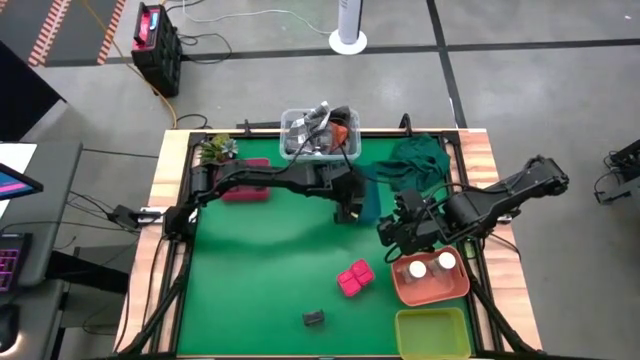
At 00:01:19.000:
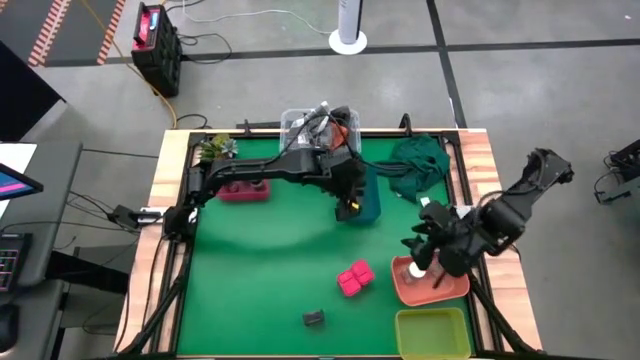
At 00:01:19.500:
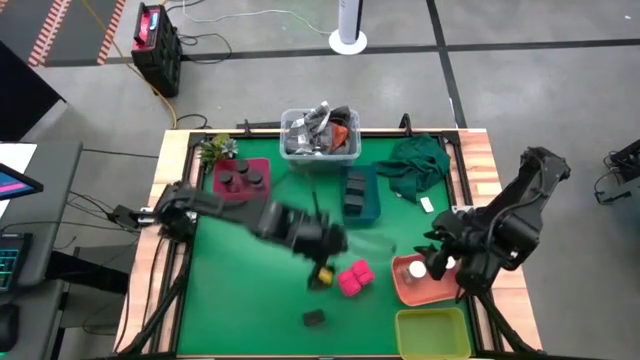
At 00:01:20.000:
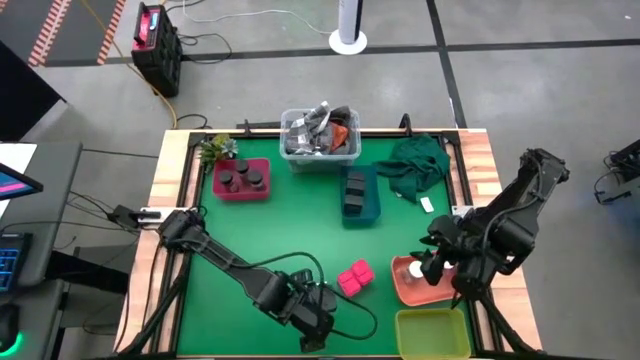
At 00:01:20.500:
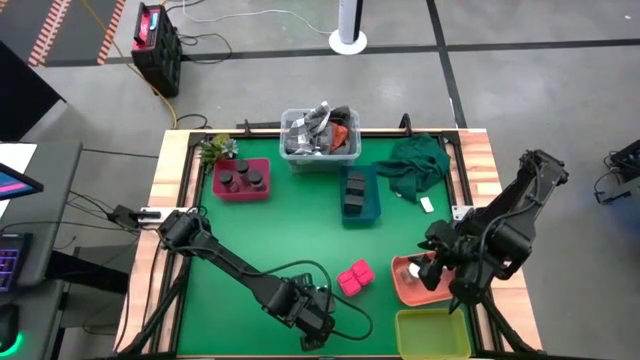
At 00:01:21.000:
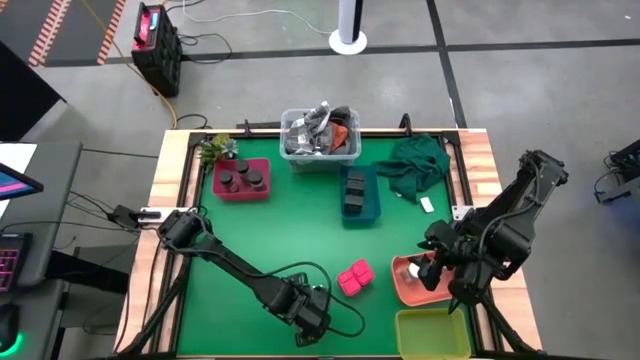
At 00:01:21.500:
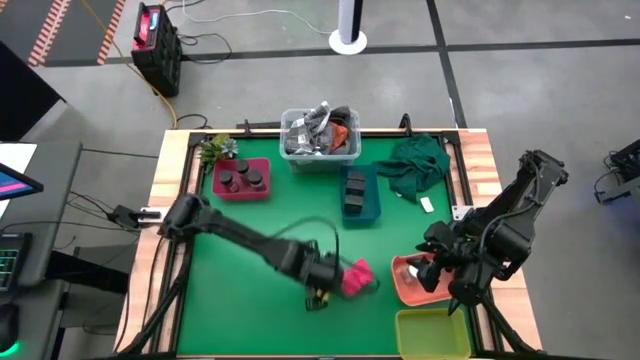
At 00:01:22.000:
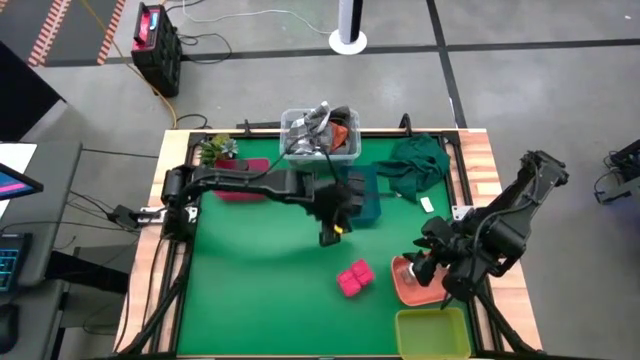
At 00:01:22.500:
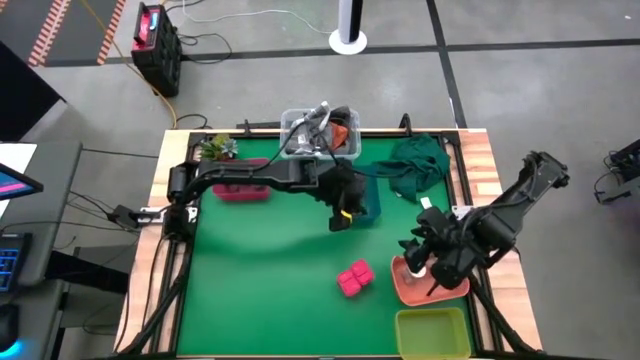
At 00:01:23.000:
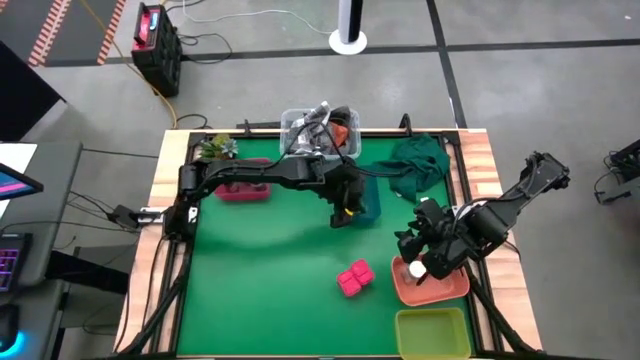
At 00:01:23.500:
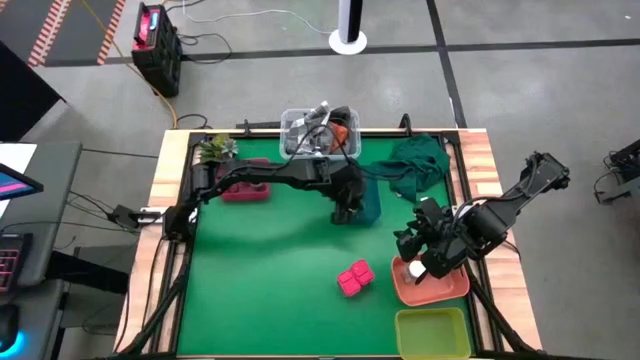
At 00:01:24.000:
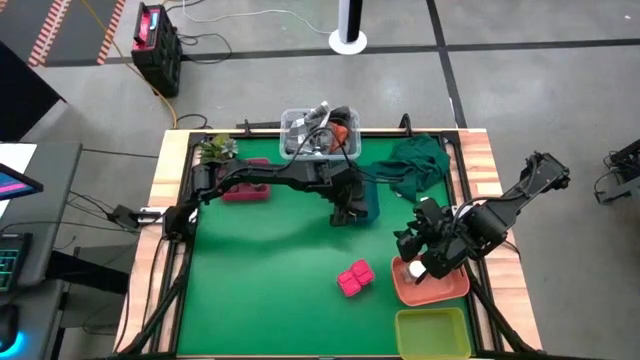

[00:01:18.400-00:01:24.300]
Task: Sort spices by type
Put the black seasoning can into the blue bin

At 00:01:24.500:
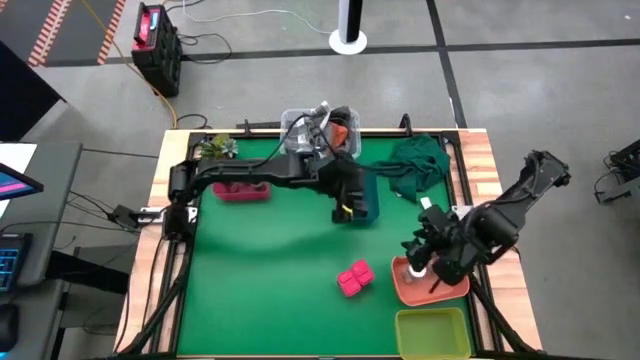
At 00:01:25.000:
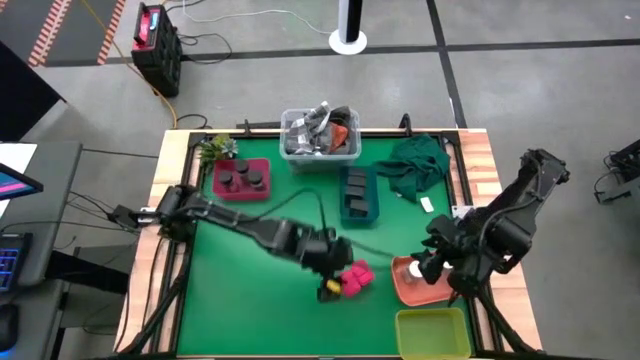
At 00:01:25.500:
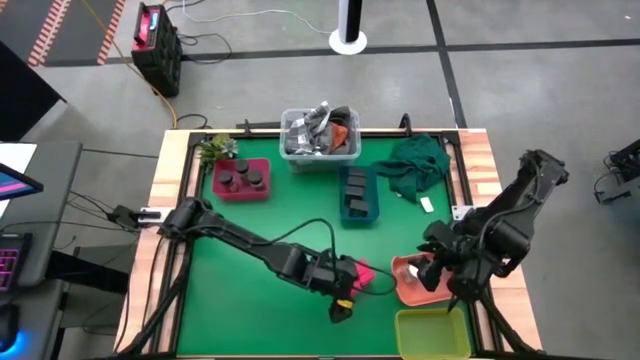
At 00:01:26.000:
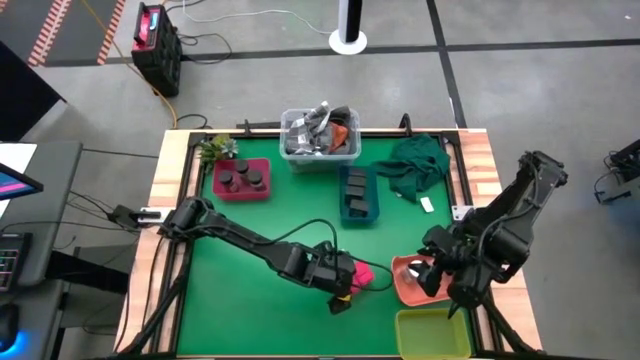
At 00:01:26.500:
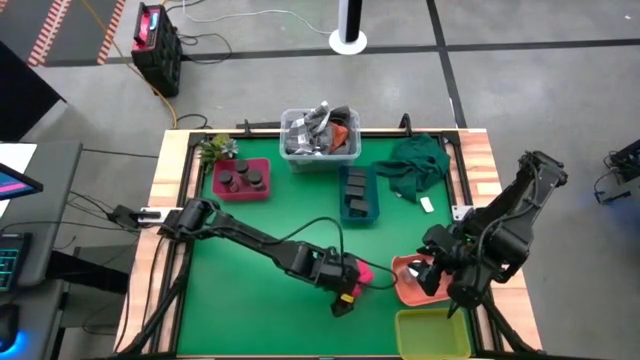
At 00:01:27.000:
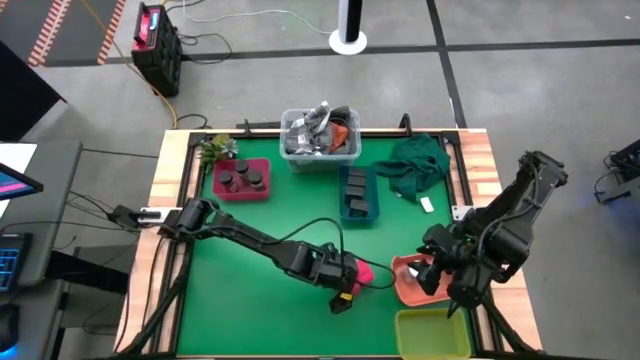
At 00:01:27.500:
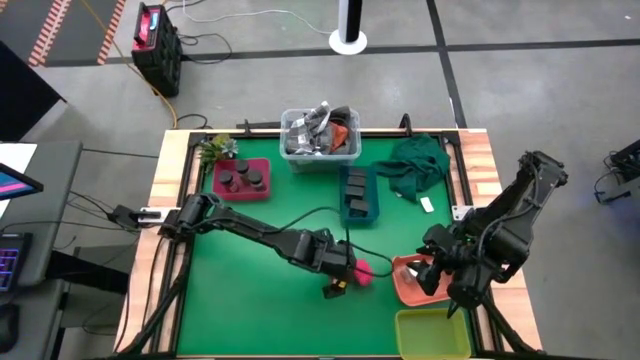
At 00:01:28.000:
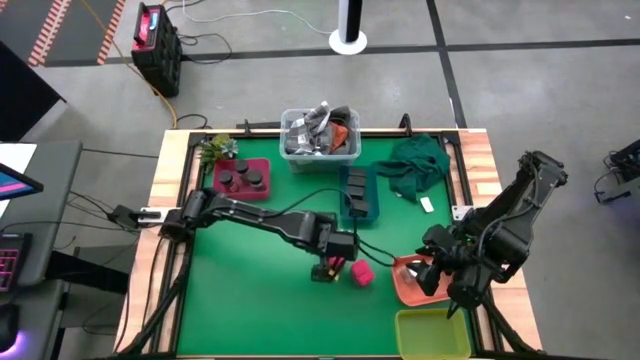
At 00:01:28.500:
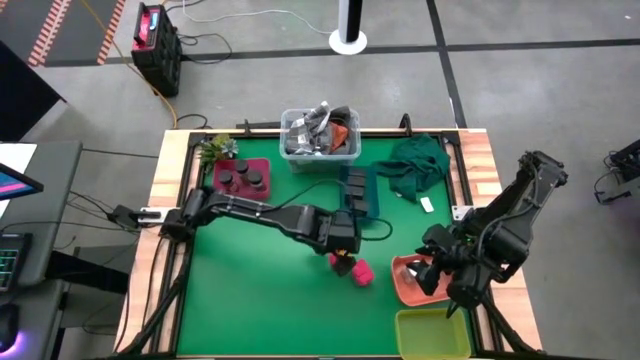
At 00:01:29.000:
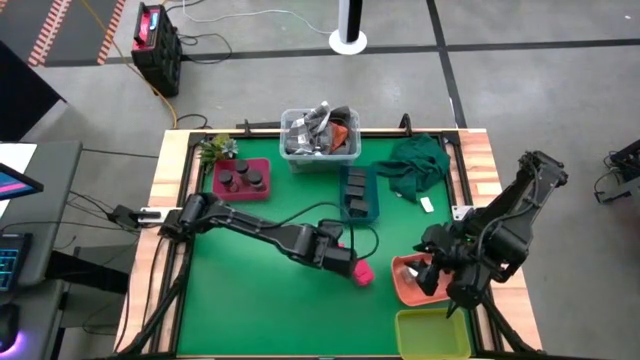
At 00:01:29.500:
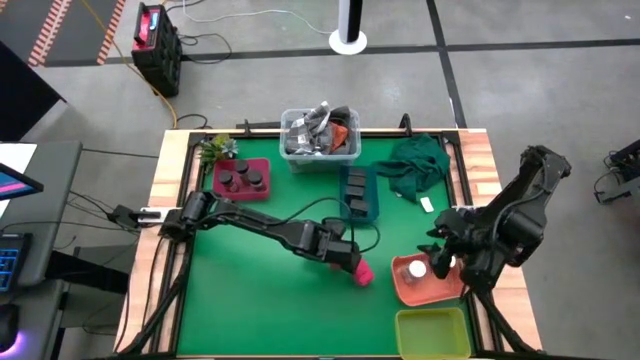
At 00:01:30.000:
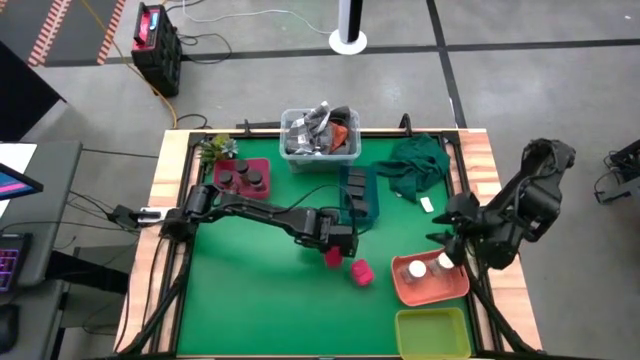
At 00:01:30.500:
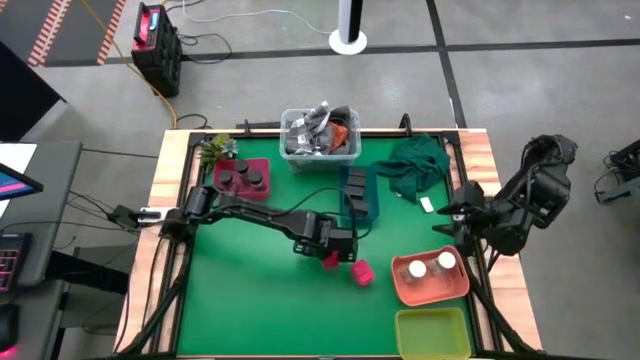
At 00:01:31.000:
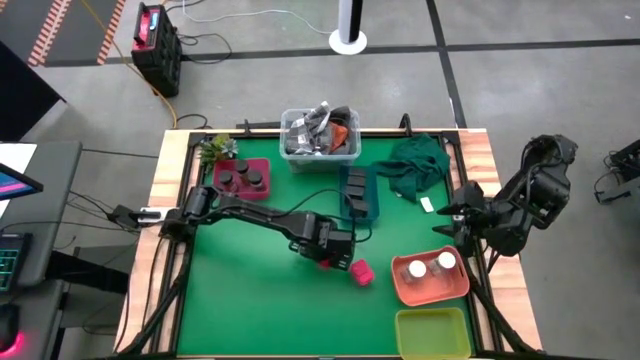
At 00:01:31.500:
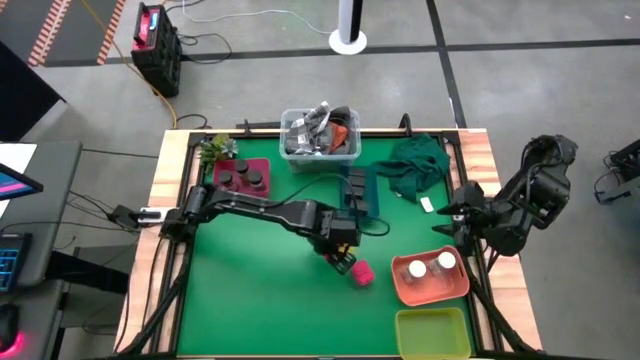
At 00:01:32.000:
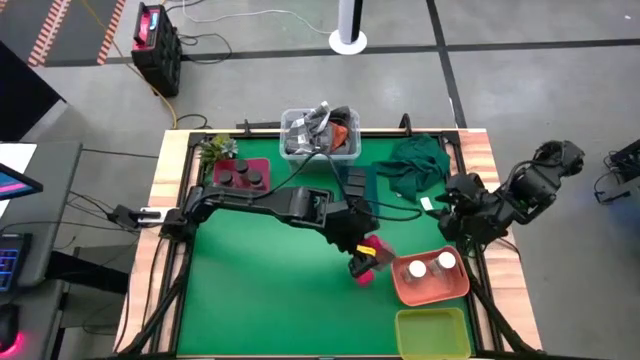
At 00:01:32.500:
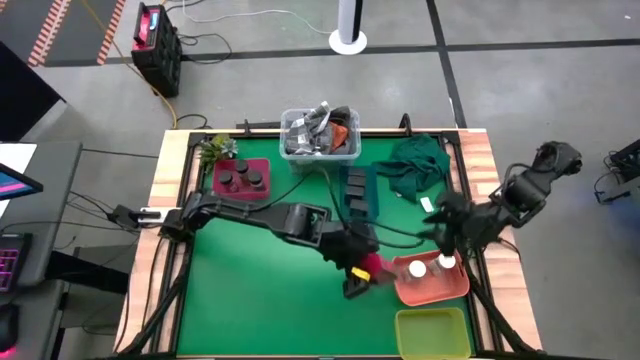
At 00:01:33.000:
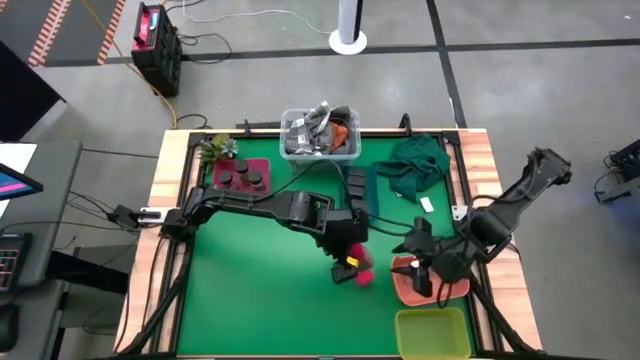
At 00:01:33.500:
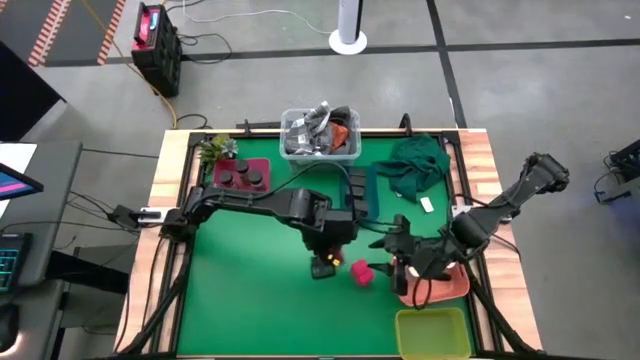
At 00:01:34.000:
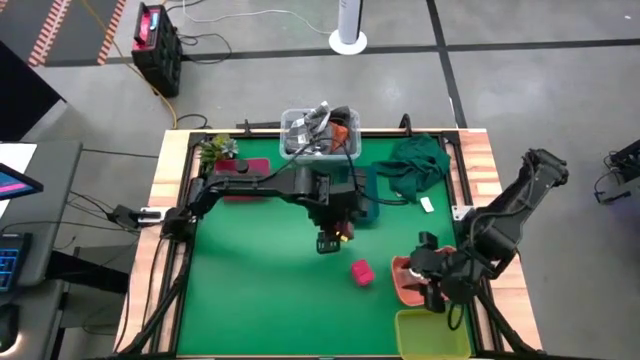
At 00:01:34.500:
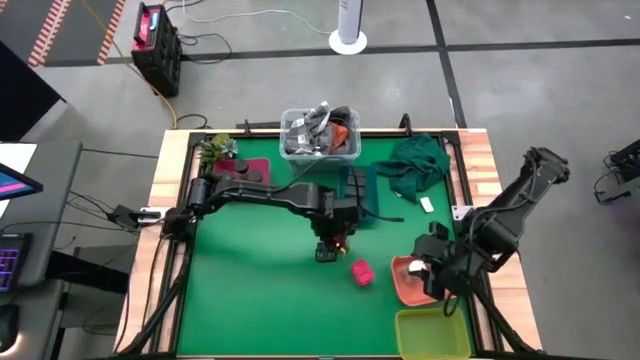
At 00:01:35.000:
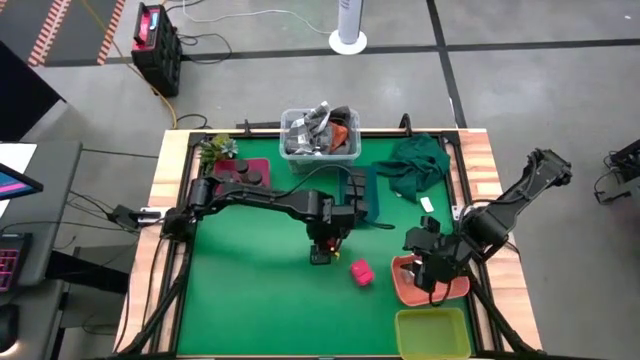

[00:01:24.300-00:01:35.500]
Put the red seasoning can into the yellow bin

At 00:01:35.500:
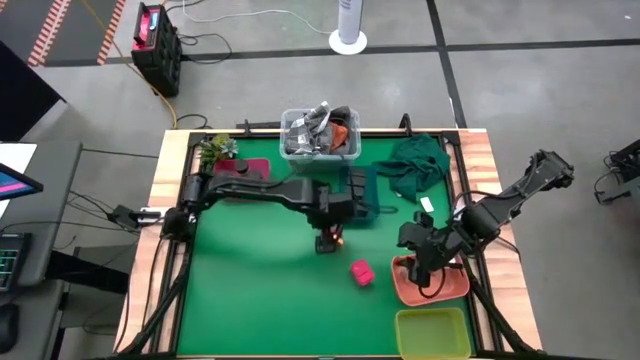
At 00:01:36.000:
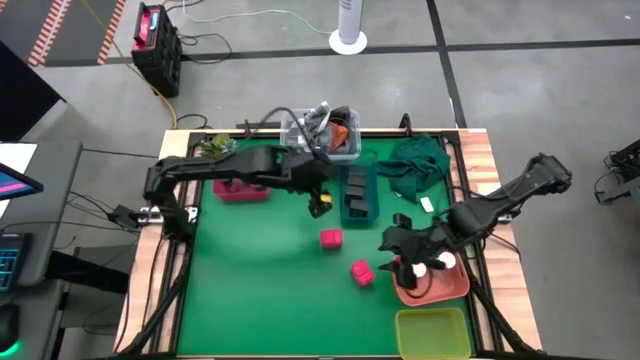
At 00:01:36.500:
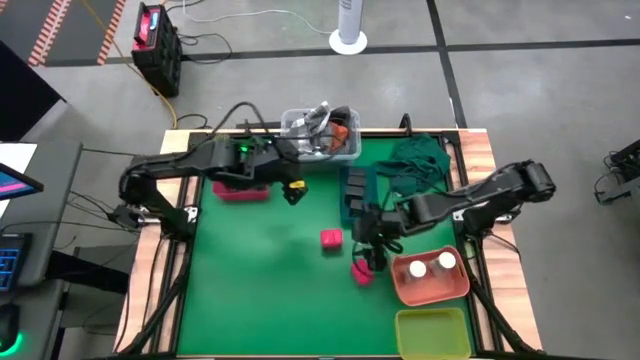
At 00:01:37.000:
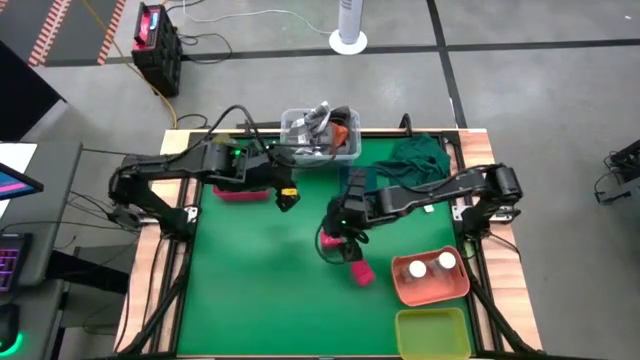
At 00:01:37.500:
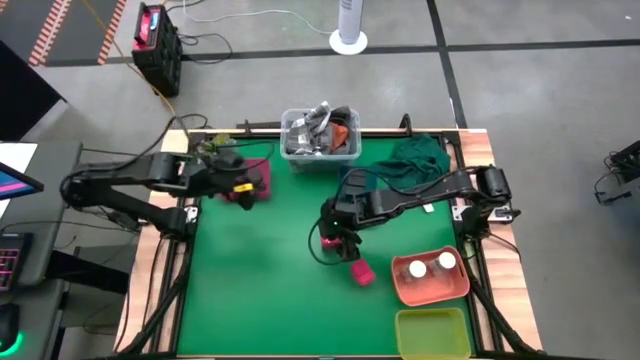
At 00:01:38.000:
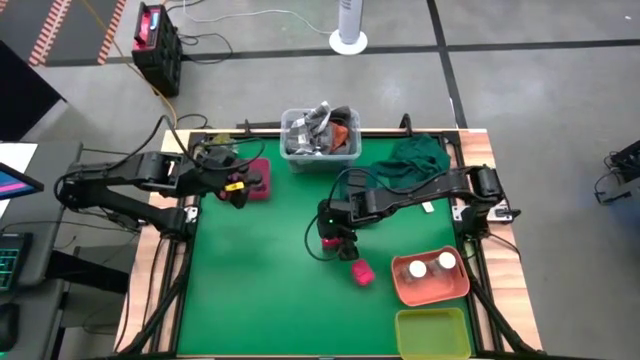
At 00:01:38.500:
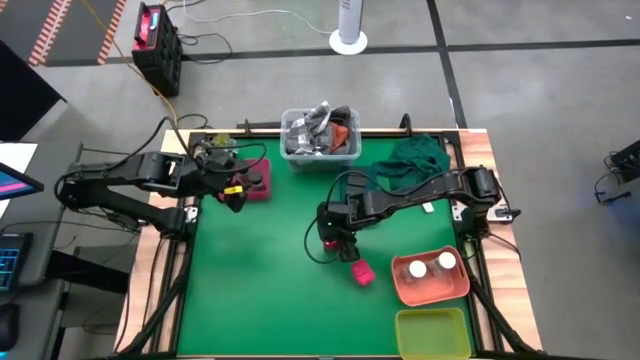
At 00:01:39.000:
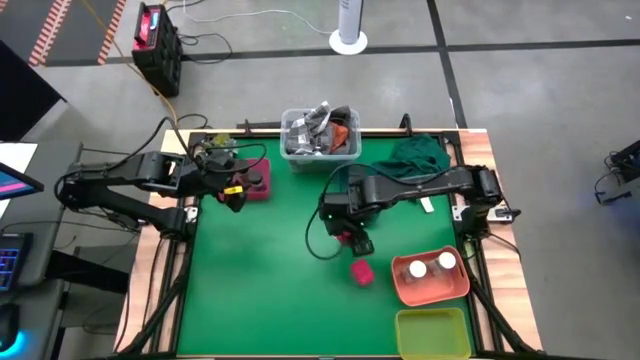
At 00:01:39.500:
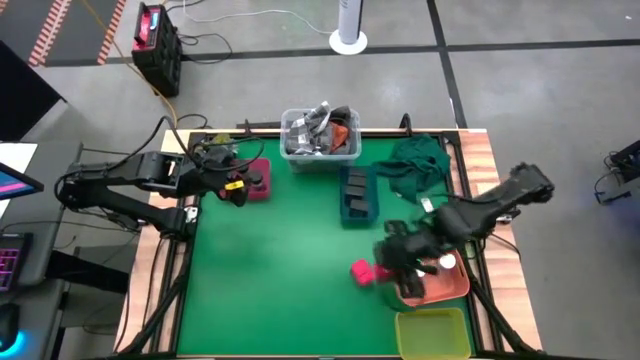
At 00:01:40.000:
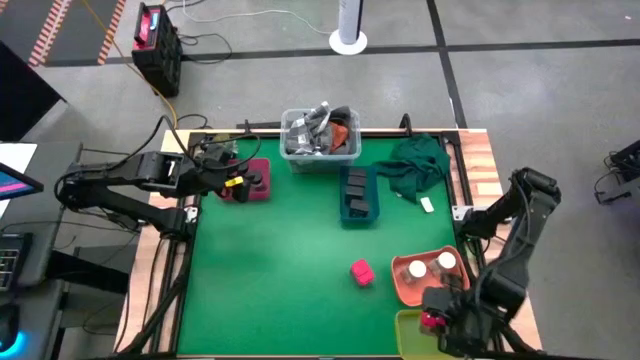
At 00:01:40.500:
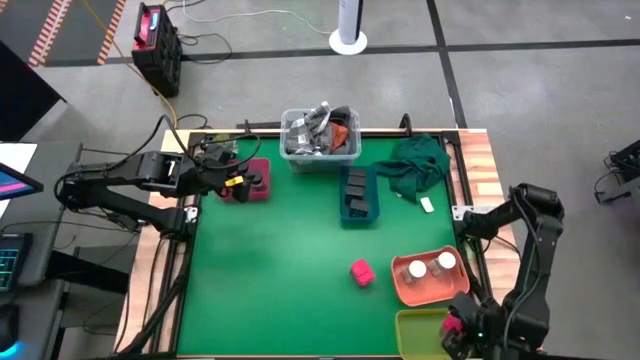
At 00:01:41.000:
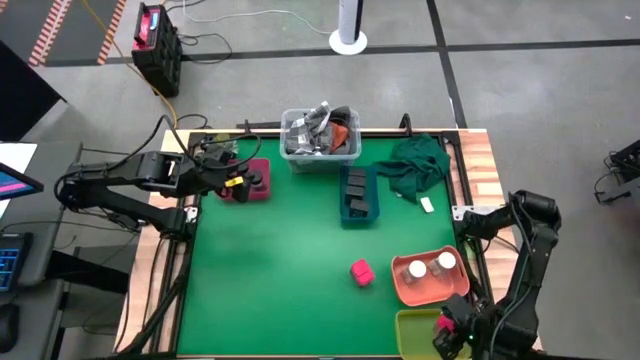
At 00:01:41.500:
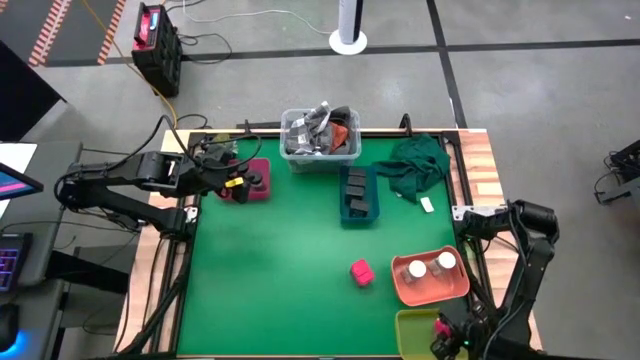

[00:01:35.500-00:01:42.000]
Put the red seasoning can into the yellow bin
